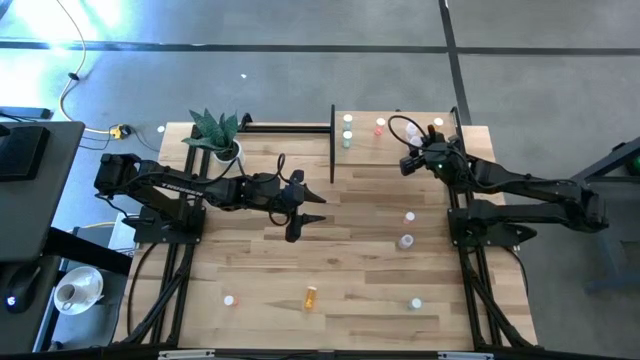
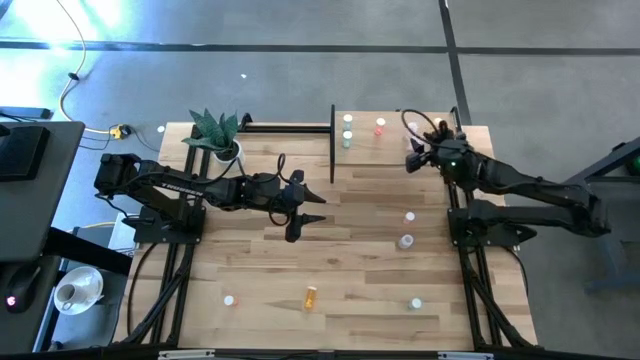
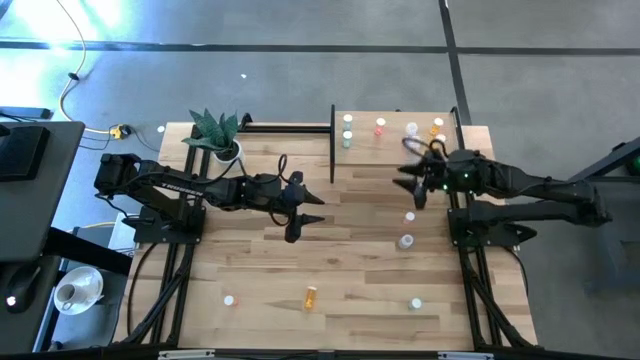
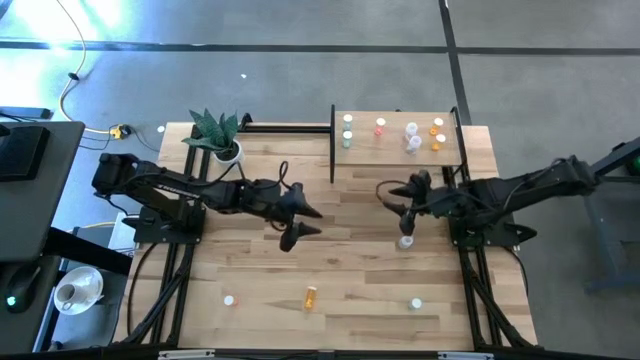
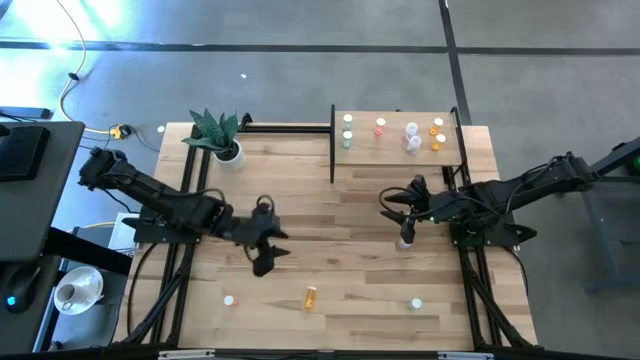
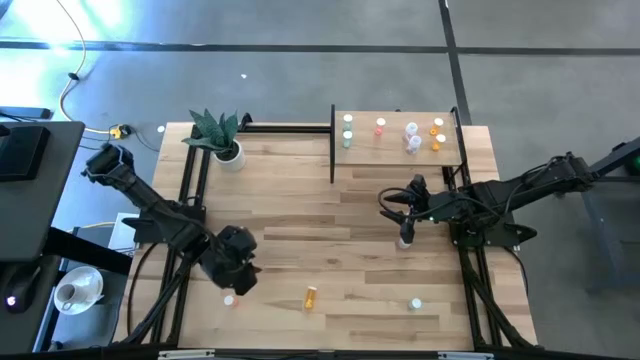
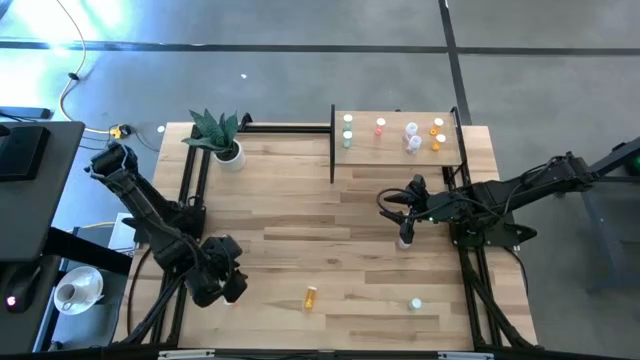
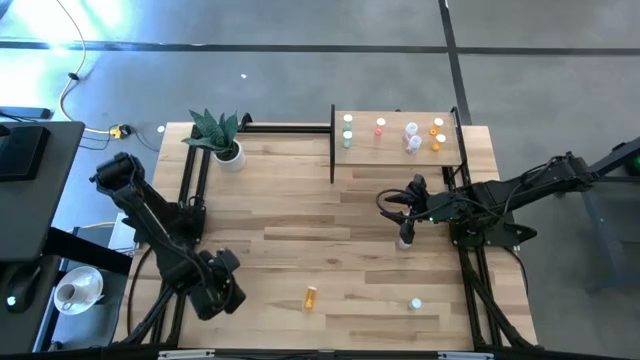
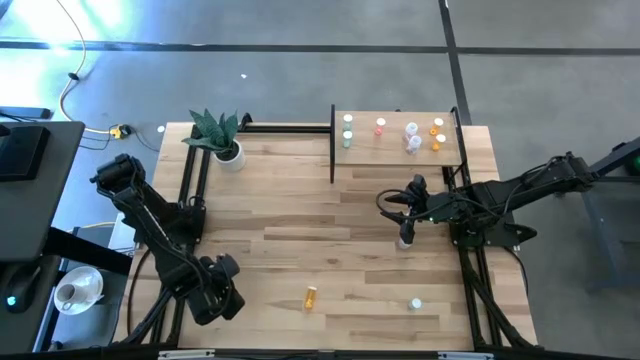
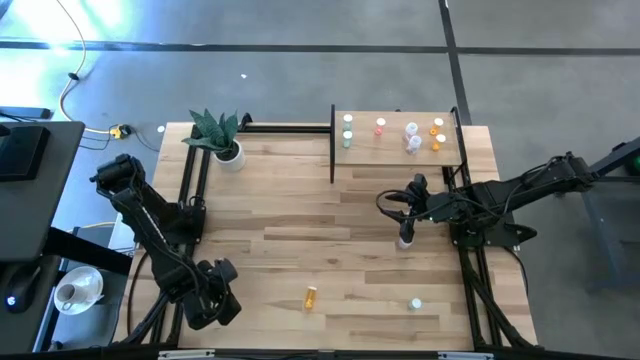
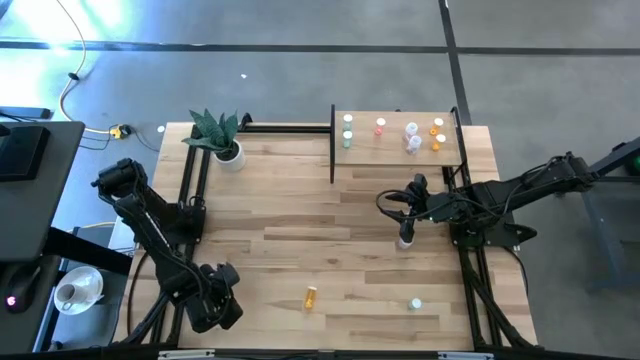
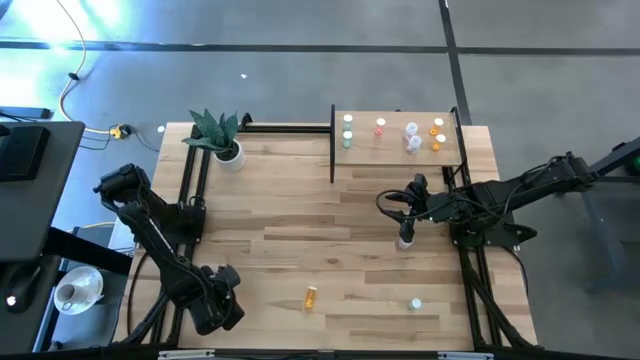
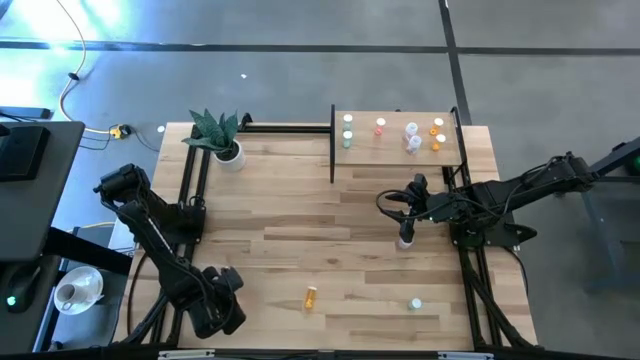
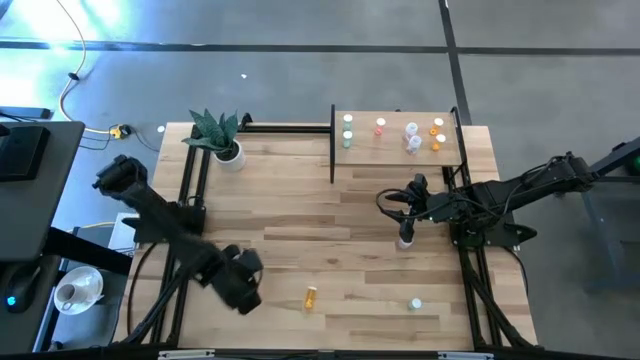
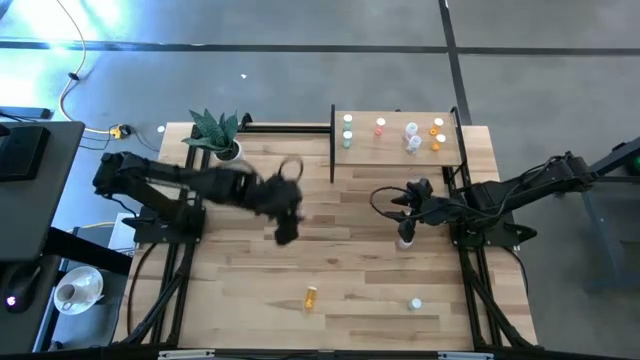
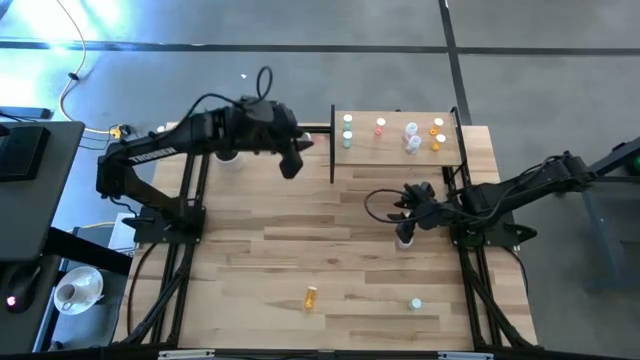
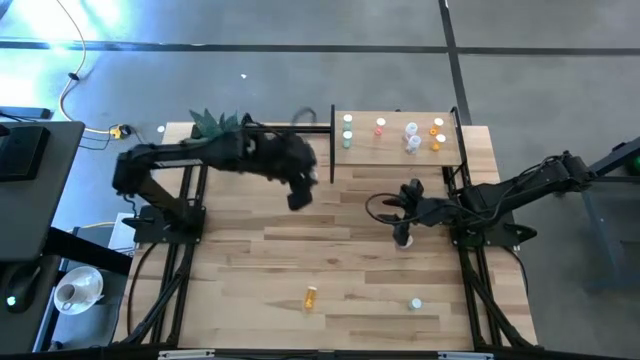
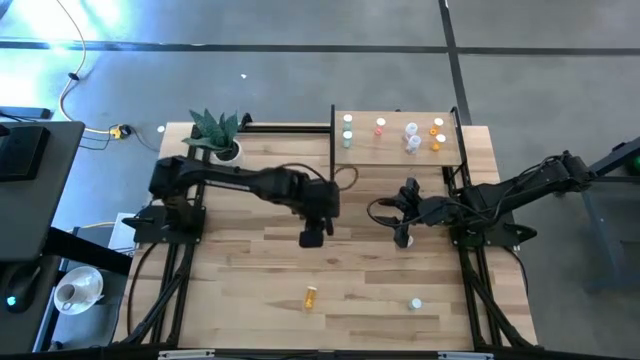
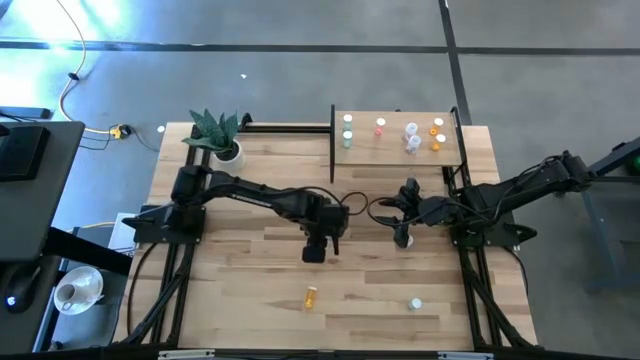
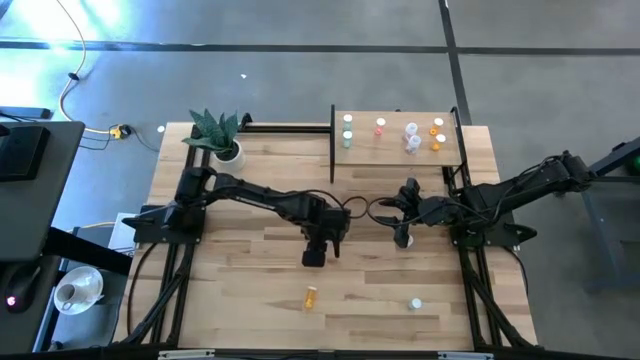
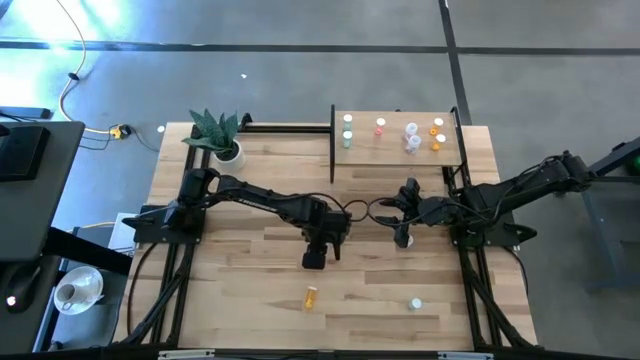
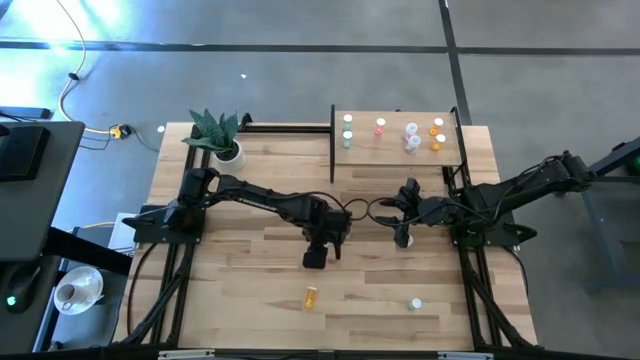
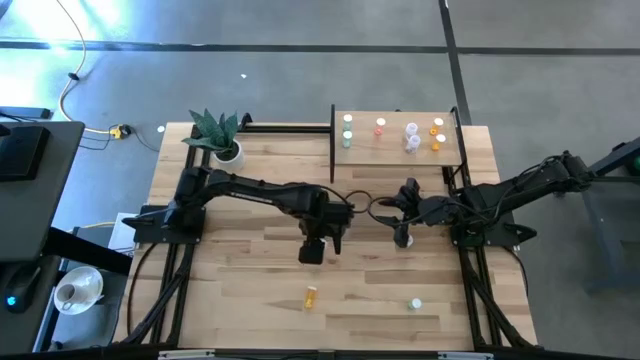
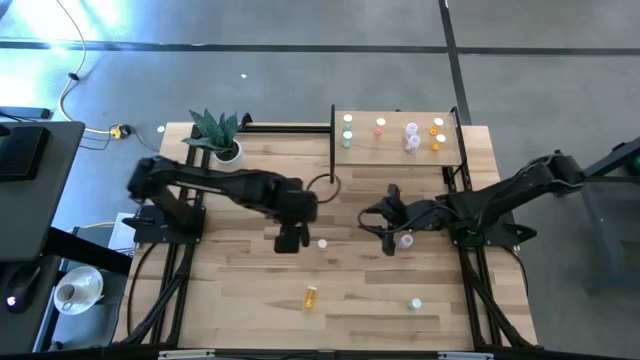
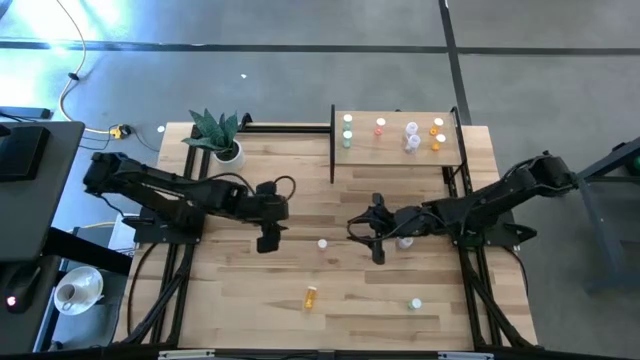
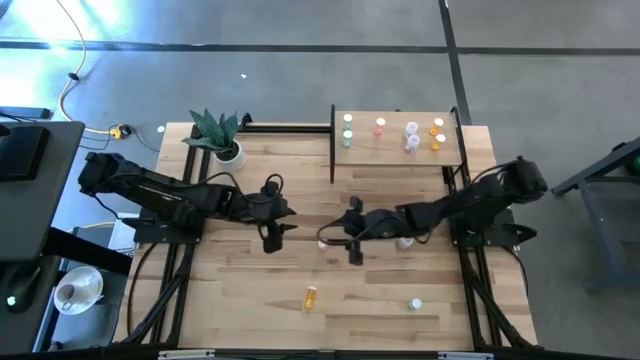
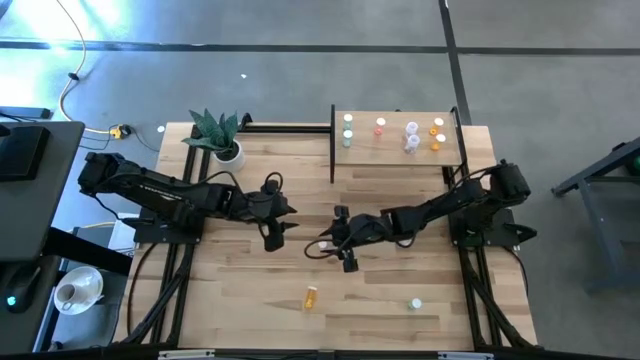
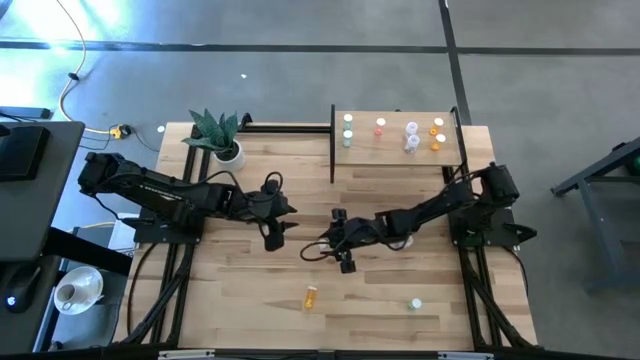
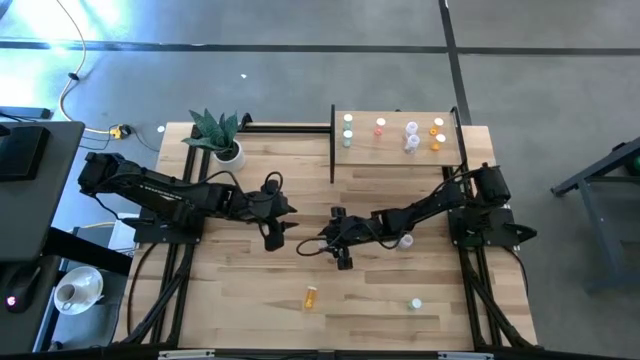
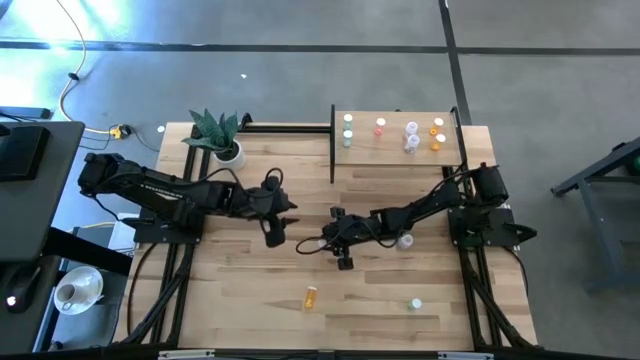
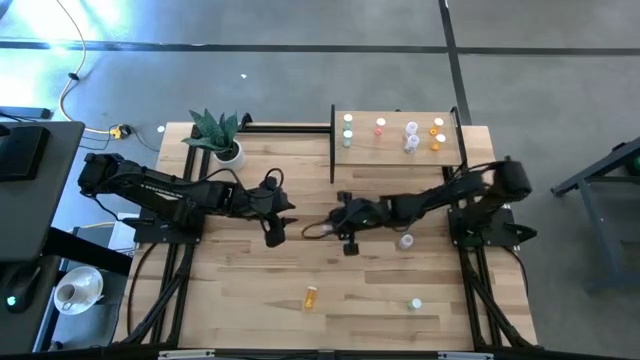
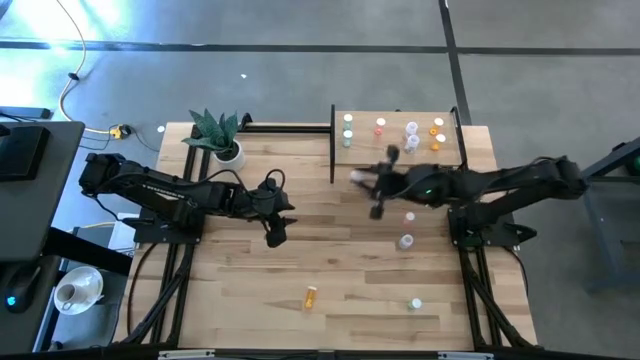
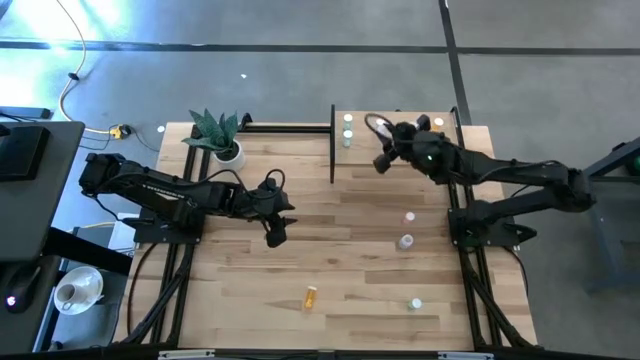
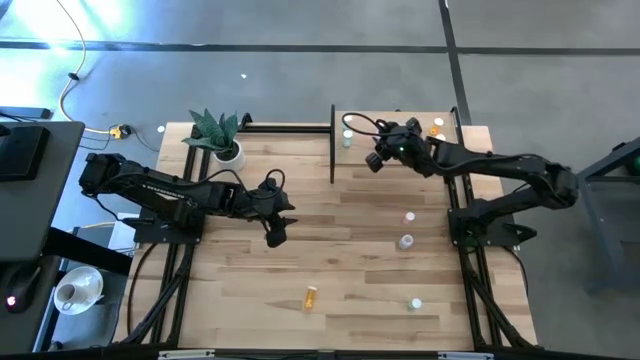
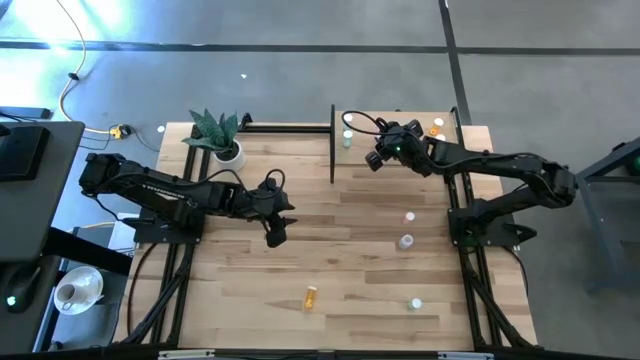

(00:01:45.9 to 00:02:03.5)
Task: Pick and place medicine bottles onto shelf by color
Put the bottom pink pill bottle on the shelf aligned with the other pink pill bottle

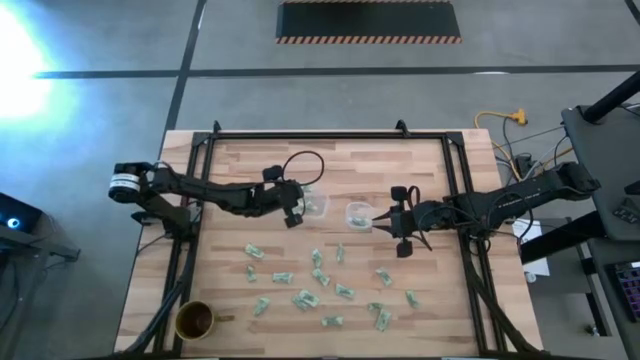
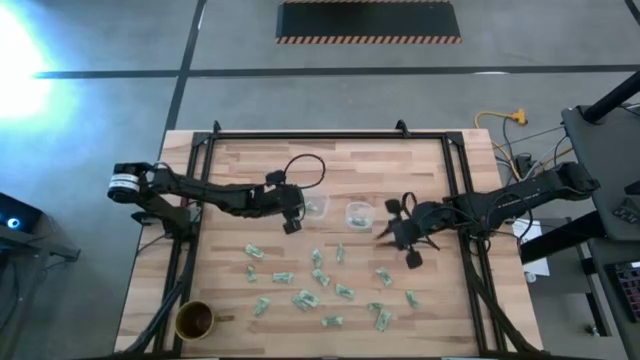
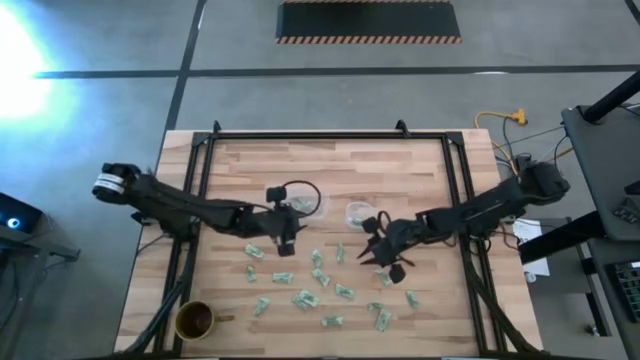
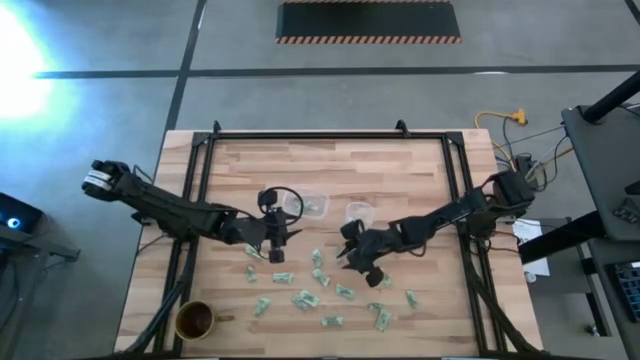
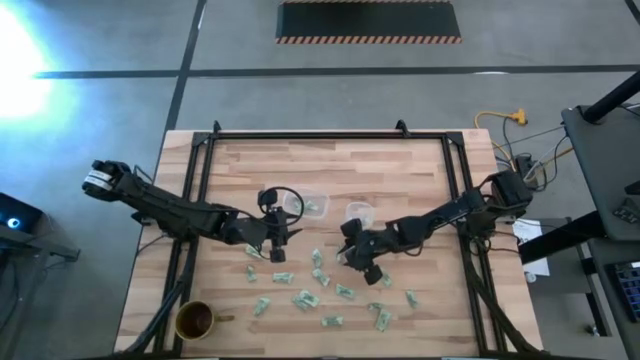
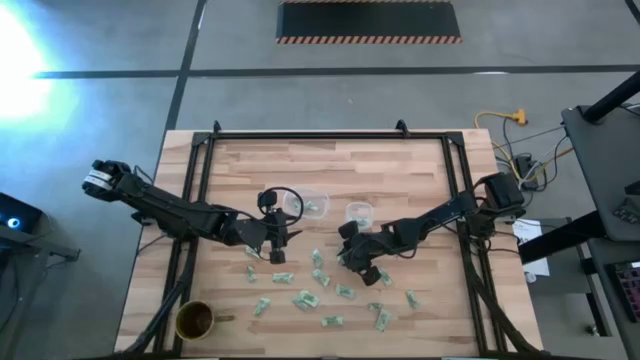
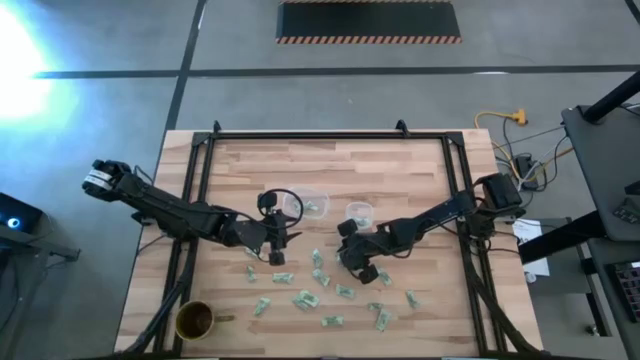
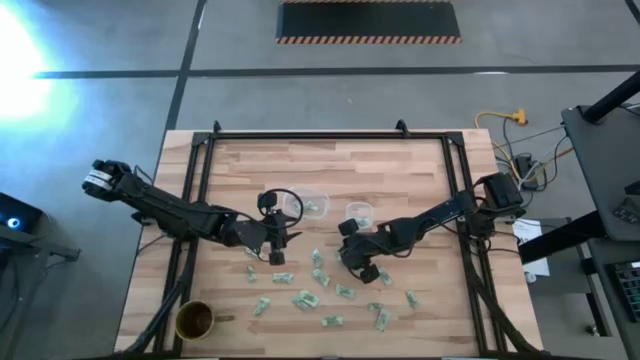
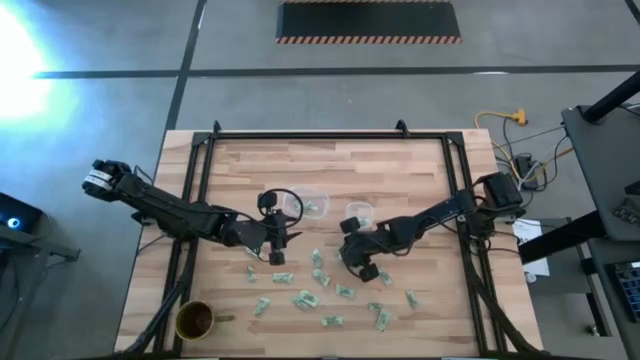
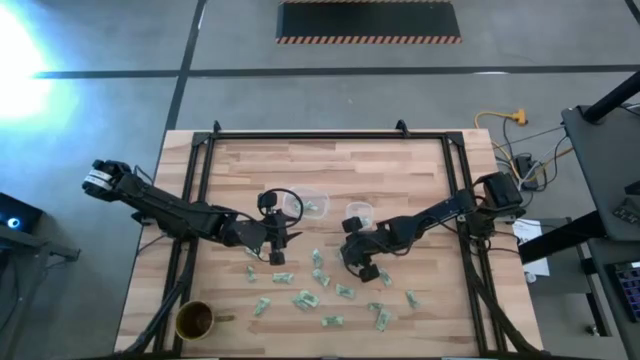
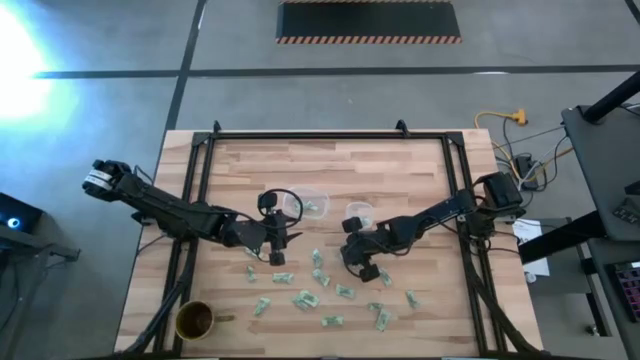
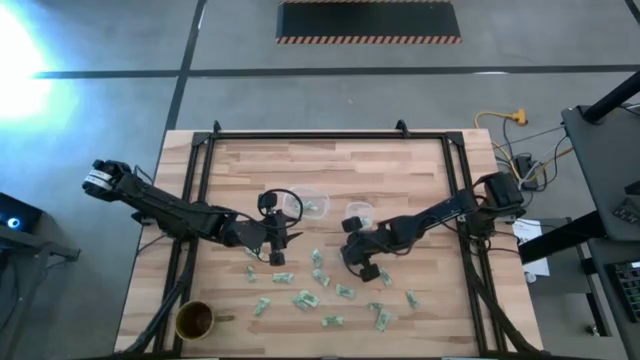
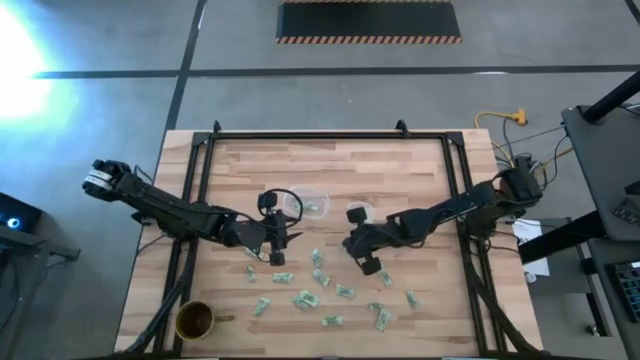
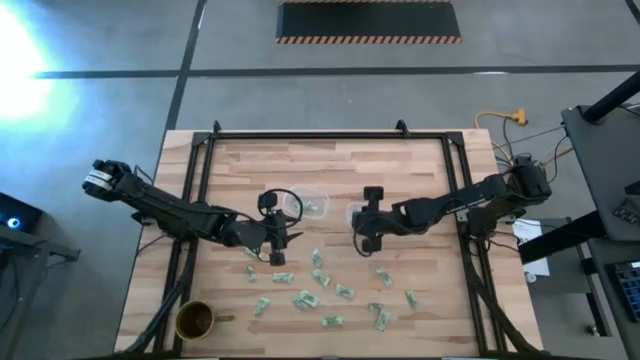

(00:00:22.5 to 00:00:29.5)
Task: Pick and place items into bin
Put the green stevia packet into the right transparent bin
